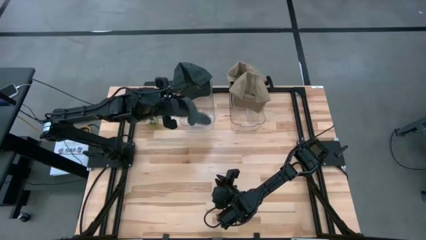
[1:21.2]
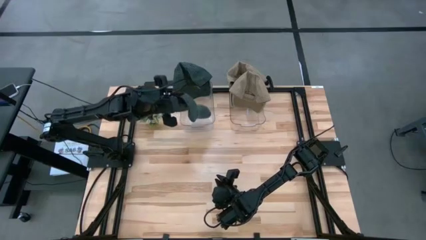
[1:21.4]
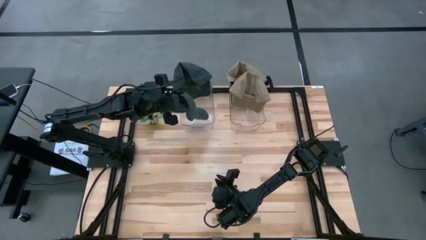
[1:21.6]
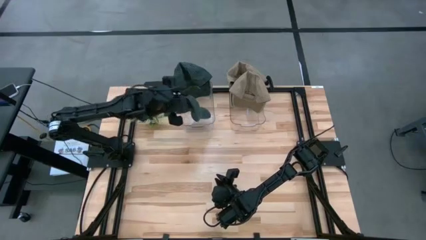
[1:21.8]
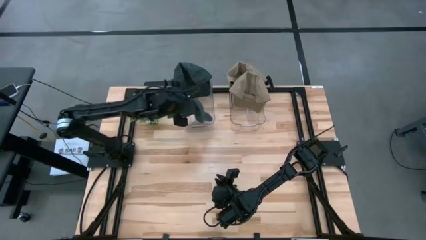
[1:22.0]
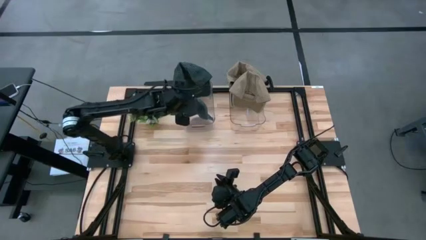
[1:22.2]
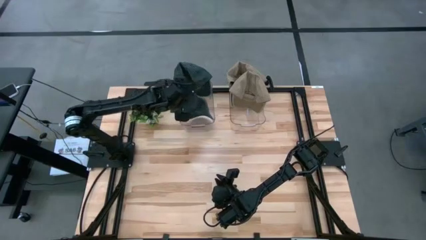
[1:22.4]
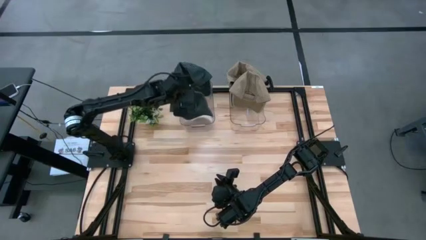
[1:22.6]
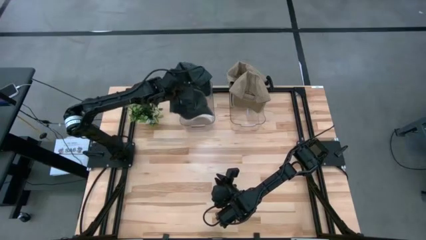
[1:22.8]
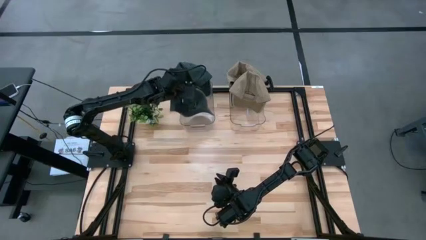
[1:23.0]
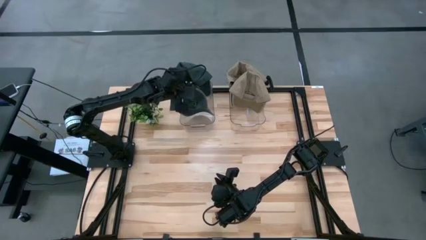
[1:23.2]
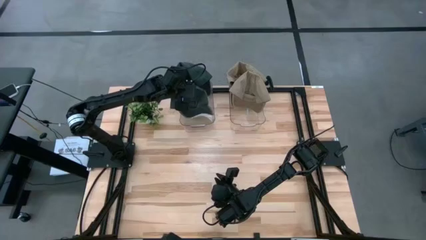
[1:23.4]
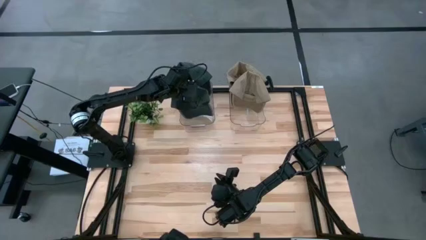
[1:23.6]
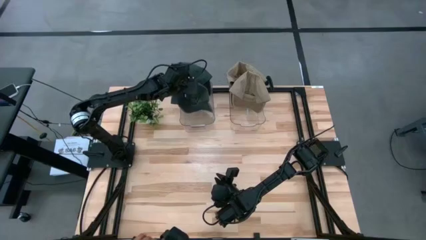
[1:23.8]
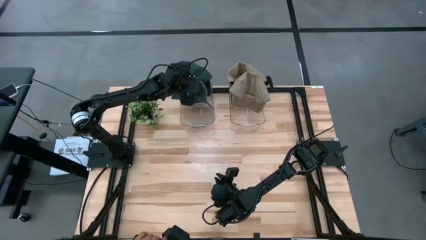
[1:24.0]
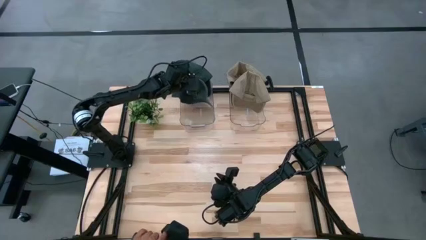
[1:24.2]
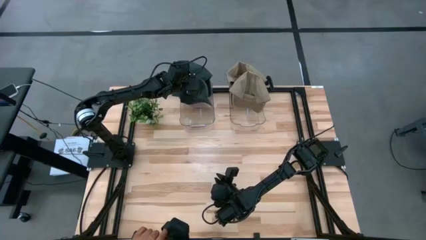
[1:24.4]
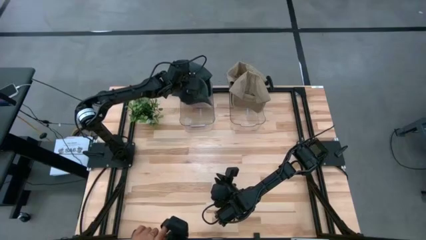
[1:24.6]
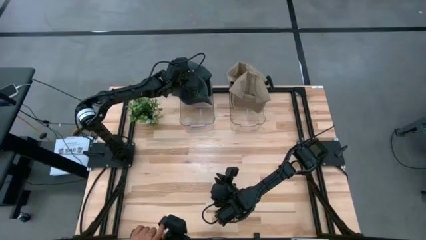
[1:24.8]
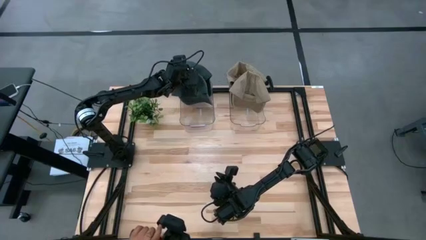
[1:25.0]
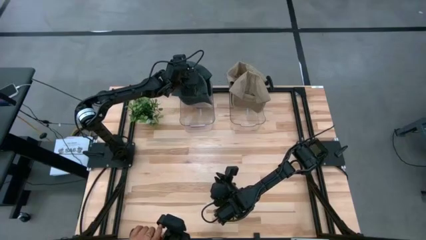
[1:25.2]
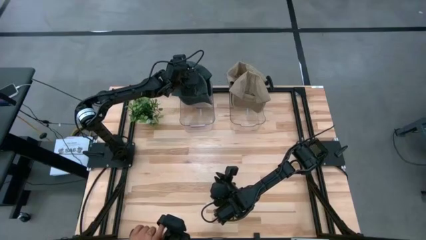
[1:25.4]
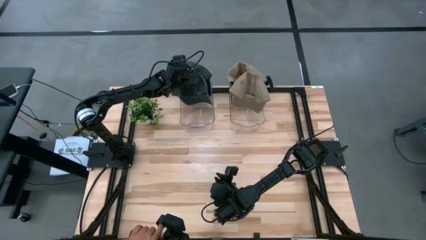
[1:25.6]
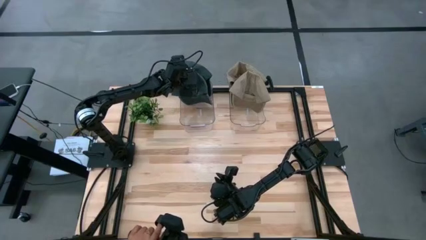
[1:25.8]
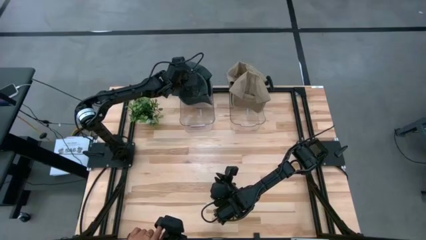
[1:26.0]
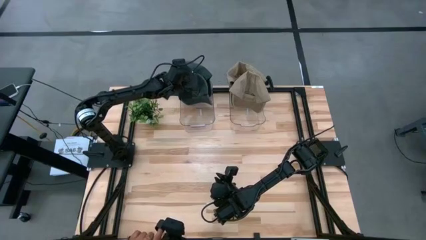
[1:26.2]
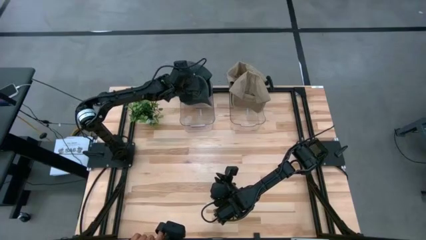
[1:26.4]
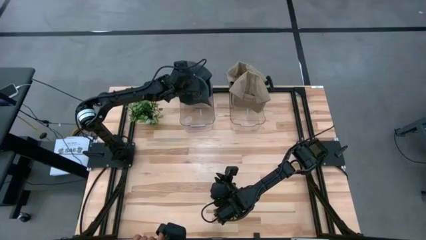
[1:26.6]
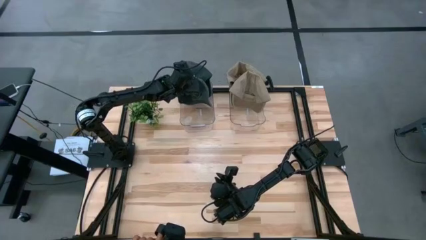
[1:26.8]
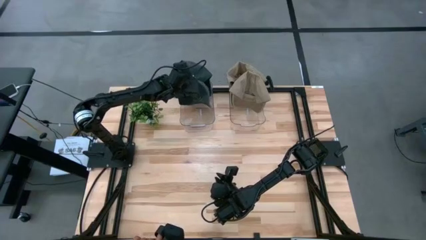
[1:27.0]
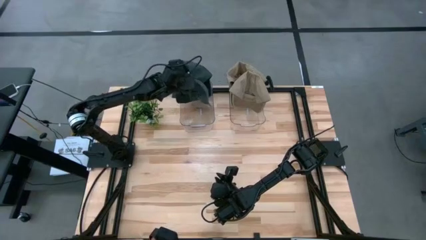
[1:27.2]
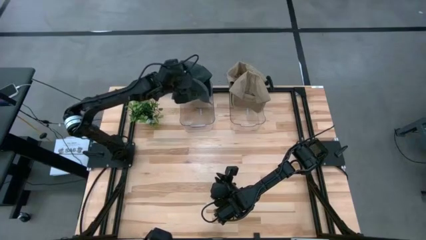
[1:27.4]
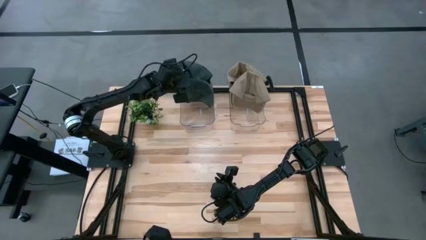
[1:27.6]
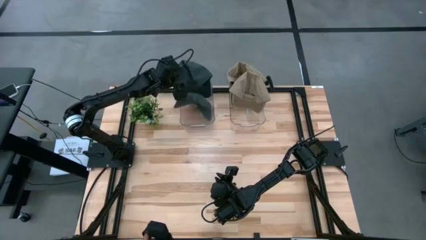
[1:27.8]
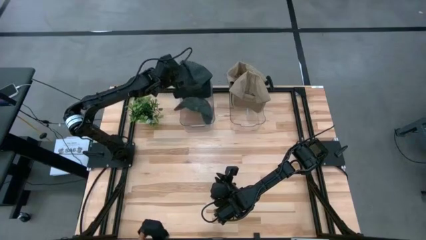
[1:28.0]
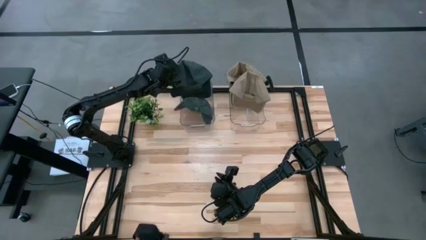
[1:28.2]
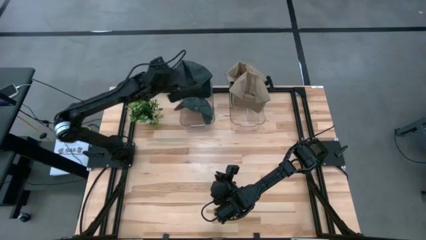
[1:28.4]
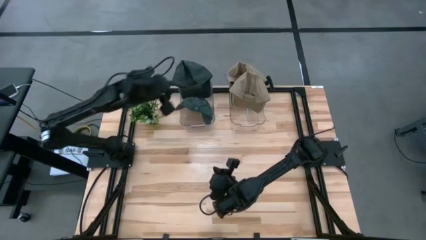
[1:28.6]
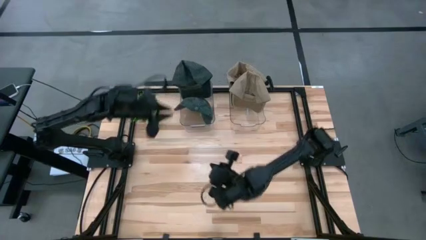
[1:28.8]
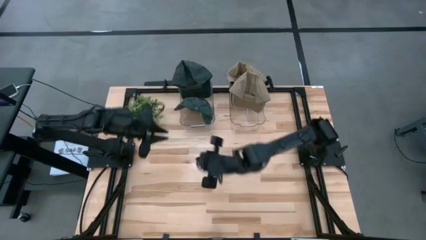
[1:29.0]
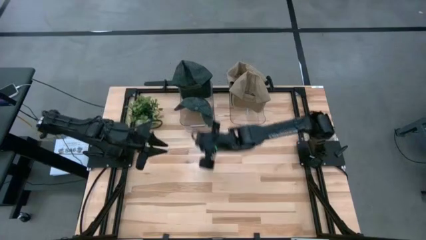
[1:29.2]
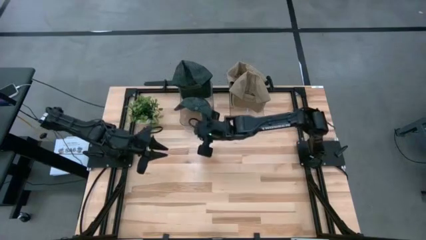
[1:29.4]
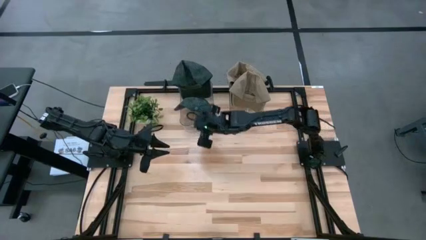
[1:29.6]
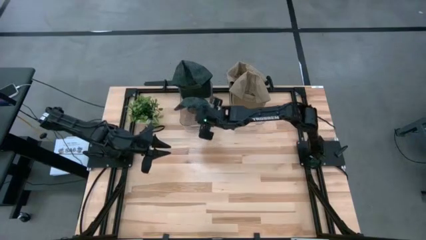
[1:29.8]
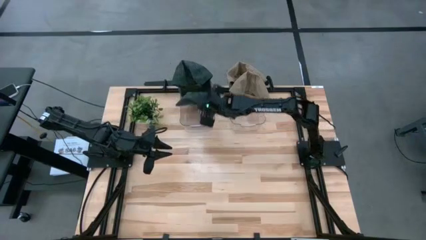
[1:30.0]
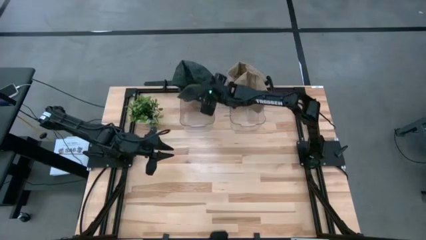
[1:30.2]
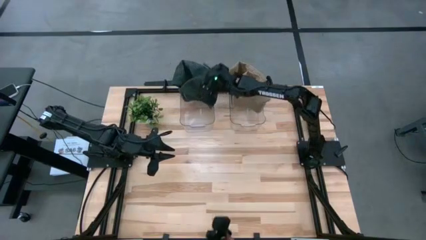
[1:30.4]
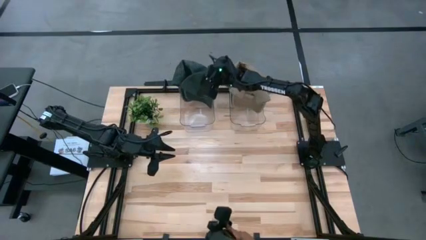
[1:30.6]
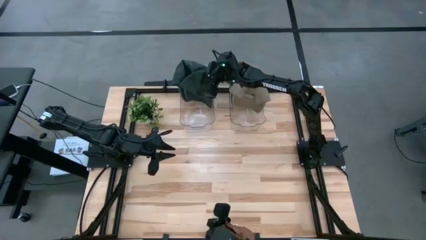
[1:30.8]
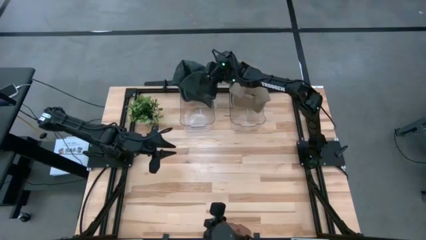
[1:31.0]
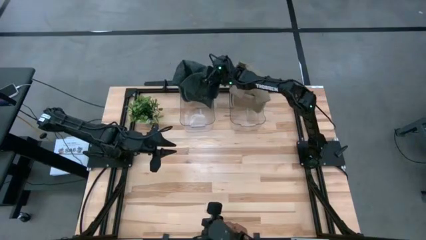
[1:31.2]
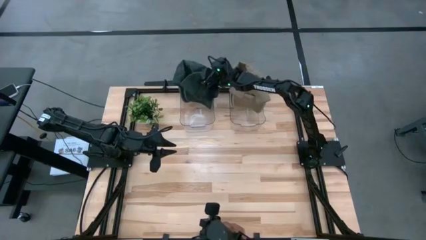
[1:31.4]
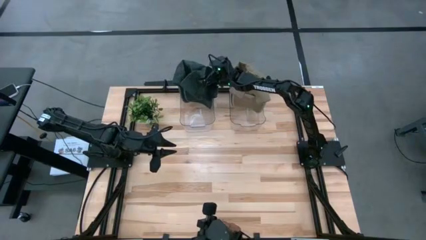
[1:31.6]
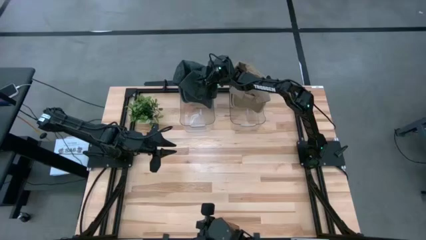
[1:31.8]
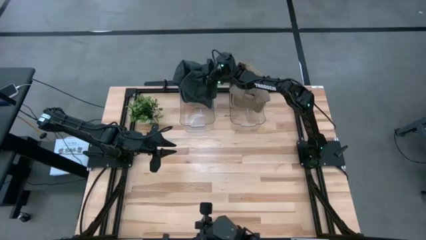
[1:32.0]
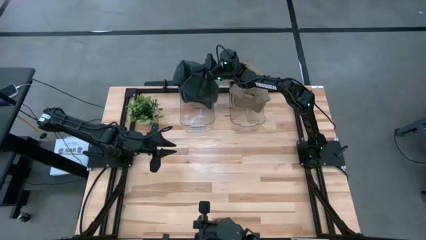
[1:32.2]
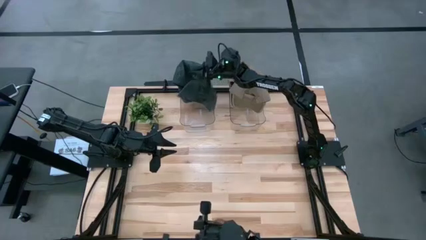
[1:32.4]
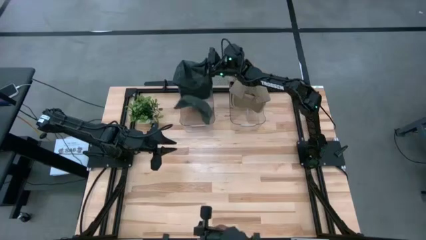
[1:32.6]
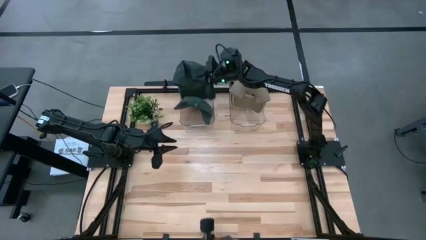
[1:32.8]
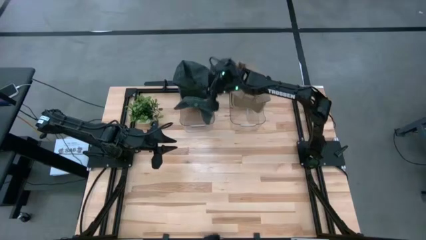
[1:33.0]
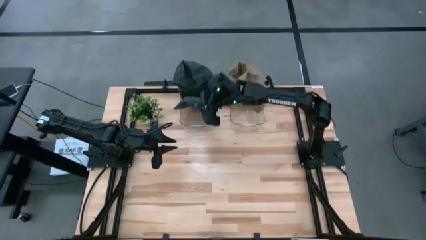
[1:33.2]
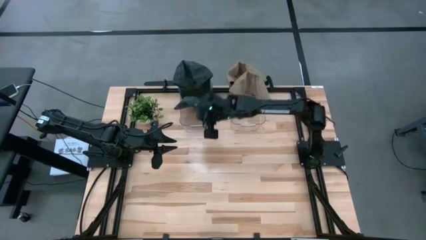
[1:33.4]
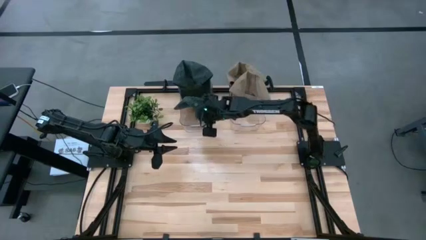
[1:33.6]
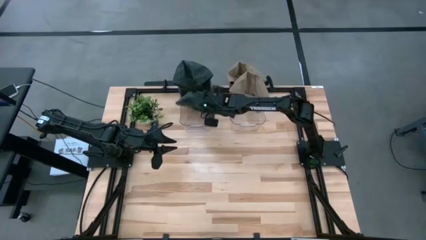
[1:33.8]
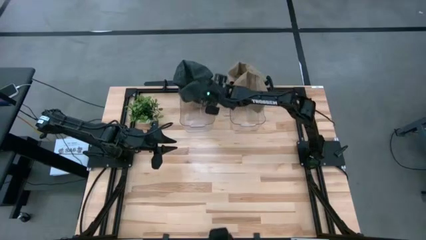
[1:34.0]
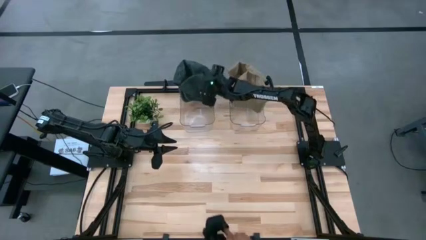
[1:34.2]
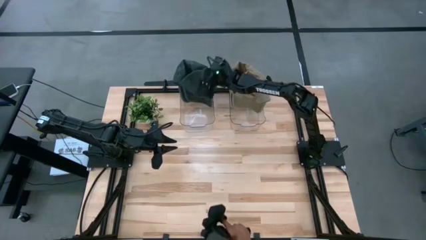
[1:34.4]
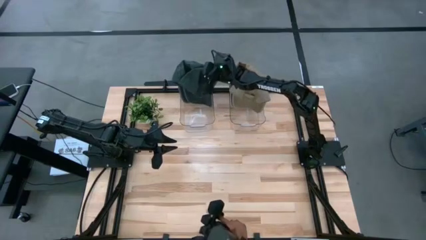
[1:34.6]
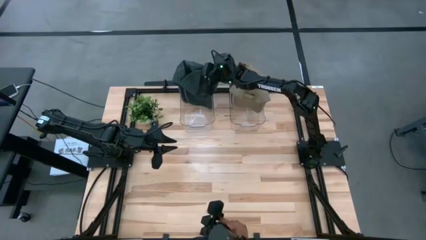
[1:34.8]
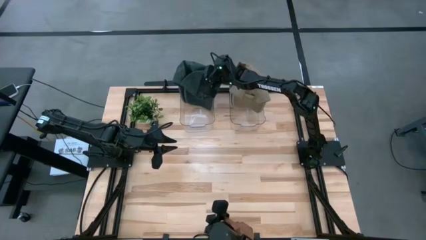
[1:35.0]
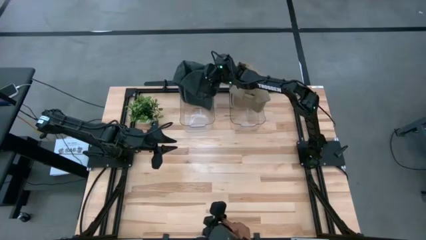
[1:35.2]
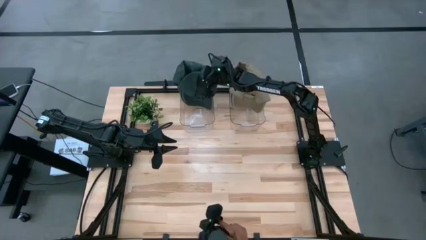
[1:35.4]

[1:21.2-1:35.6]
Task: Pick & Place hat
Put the black cap into the left transparent bin
